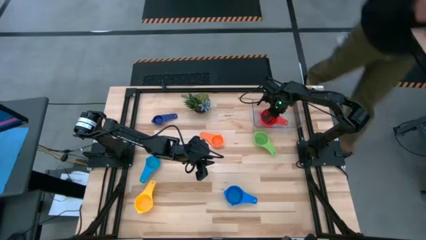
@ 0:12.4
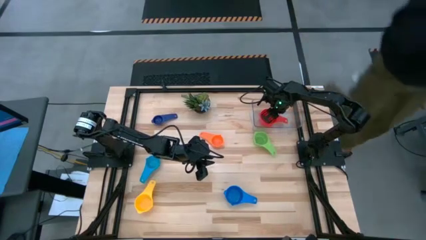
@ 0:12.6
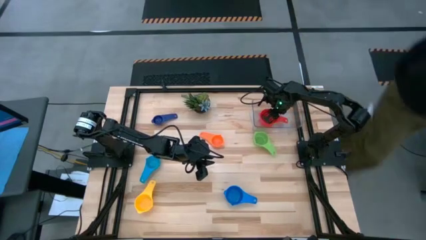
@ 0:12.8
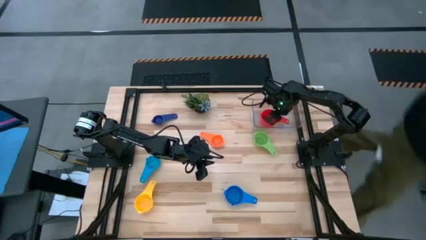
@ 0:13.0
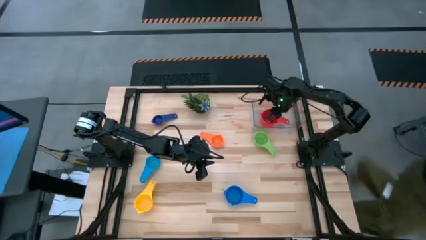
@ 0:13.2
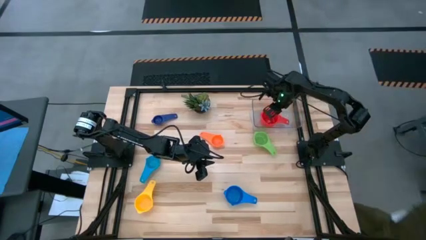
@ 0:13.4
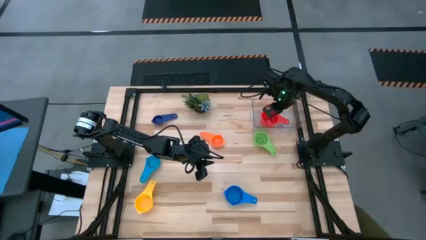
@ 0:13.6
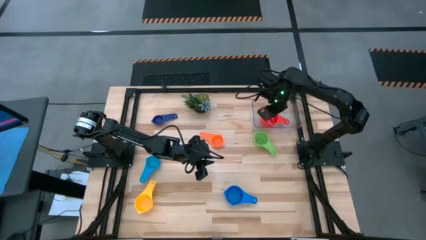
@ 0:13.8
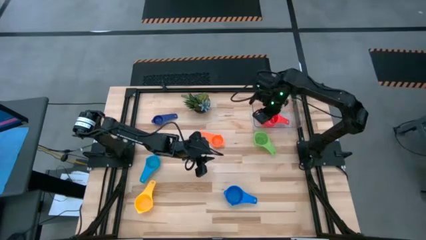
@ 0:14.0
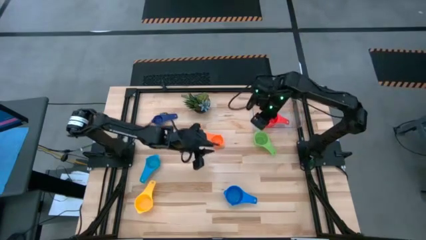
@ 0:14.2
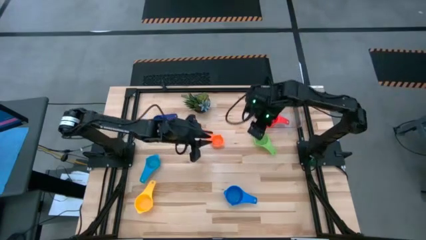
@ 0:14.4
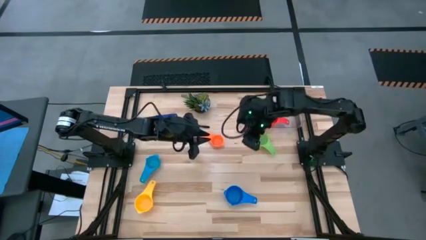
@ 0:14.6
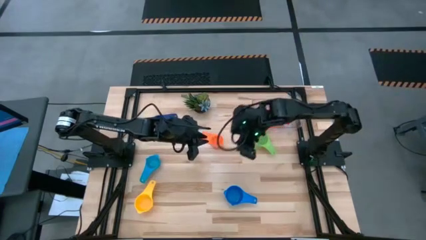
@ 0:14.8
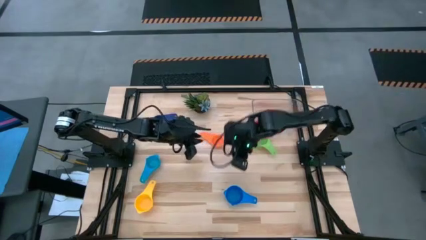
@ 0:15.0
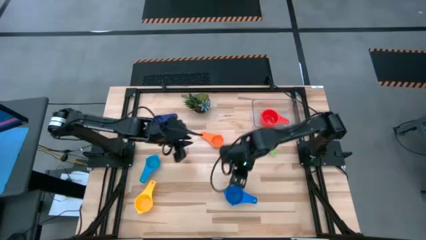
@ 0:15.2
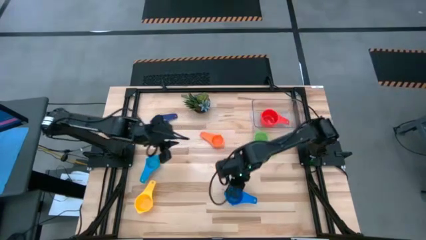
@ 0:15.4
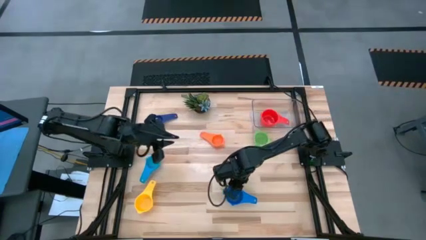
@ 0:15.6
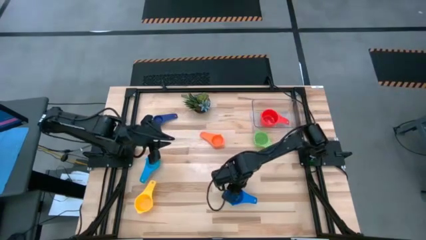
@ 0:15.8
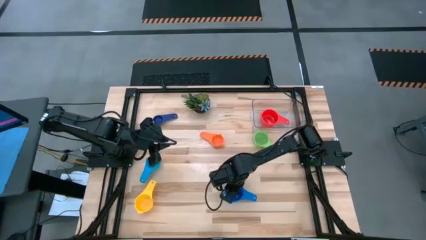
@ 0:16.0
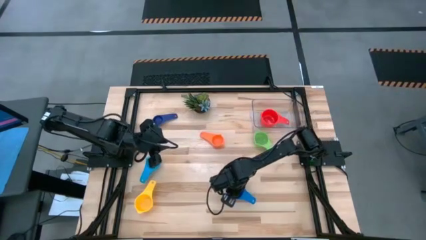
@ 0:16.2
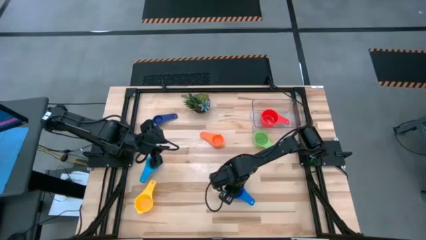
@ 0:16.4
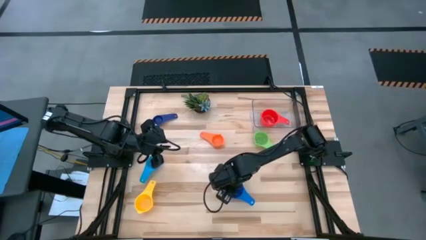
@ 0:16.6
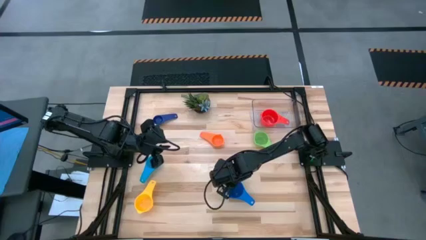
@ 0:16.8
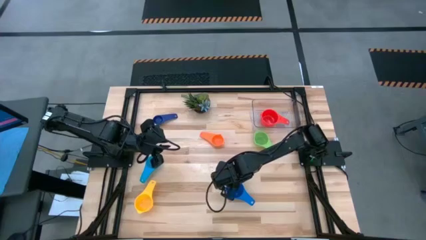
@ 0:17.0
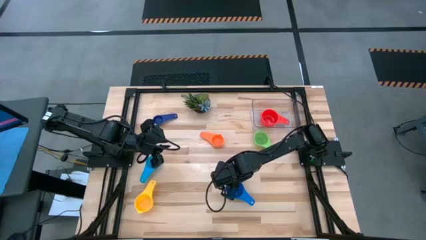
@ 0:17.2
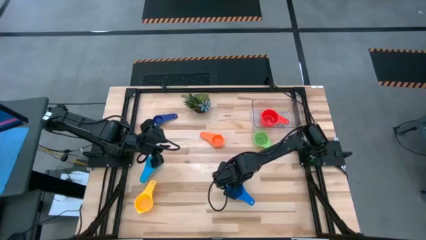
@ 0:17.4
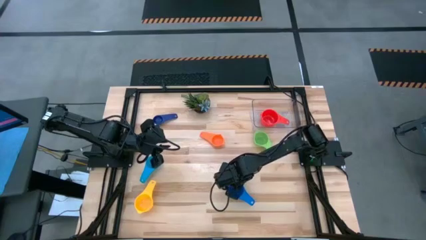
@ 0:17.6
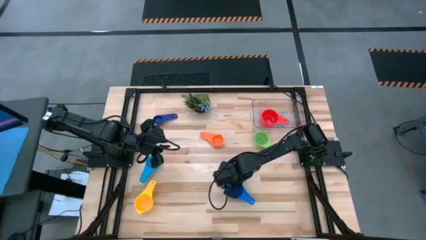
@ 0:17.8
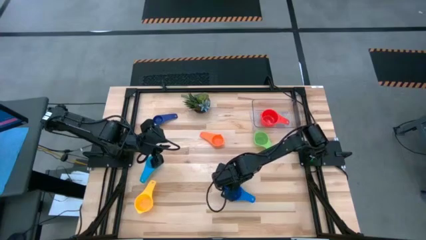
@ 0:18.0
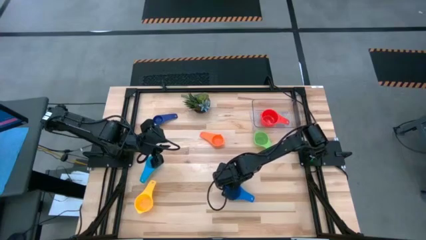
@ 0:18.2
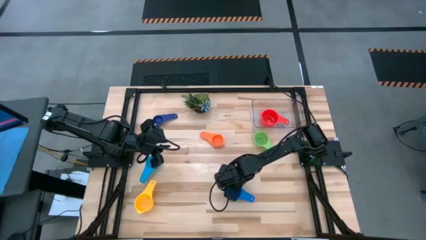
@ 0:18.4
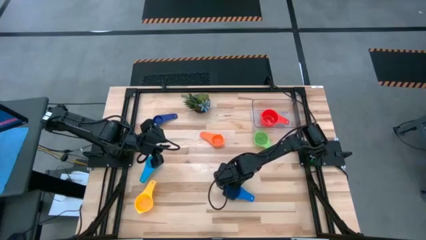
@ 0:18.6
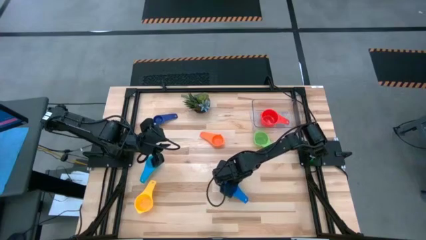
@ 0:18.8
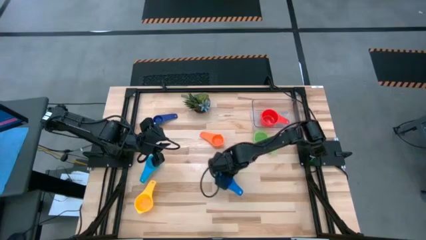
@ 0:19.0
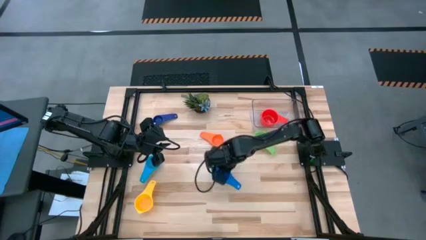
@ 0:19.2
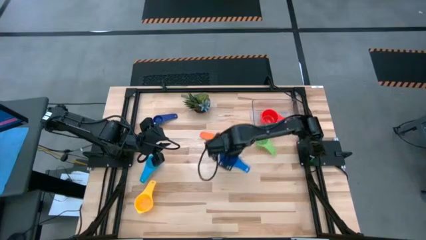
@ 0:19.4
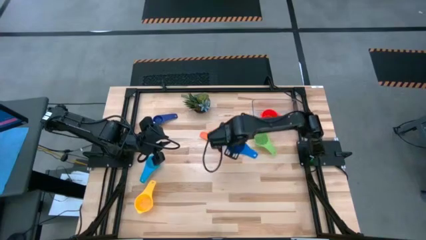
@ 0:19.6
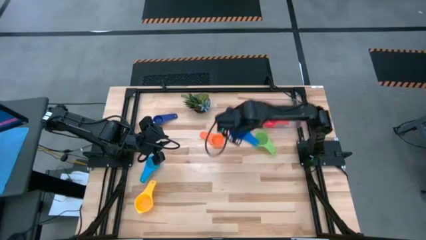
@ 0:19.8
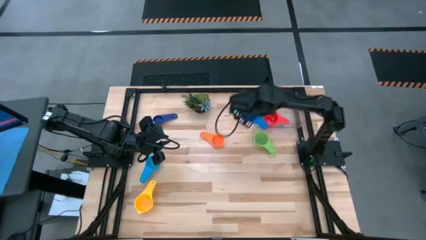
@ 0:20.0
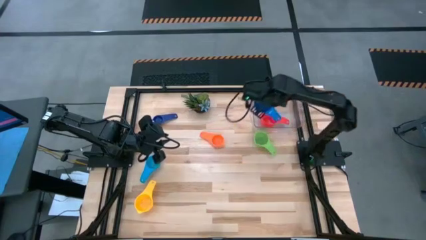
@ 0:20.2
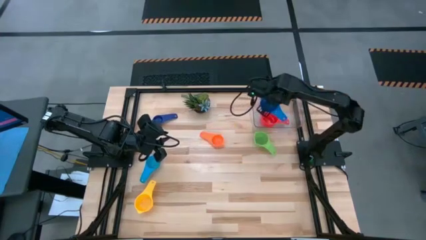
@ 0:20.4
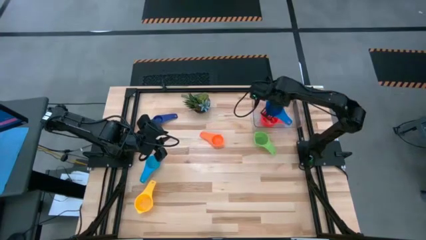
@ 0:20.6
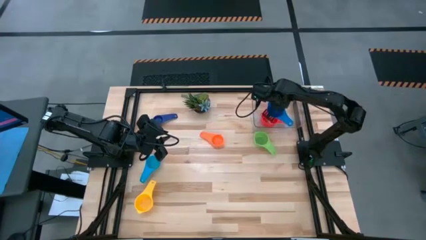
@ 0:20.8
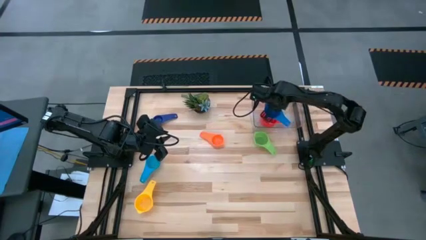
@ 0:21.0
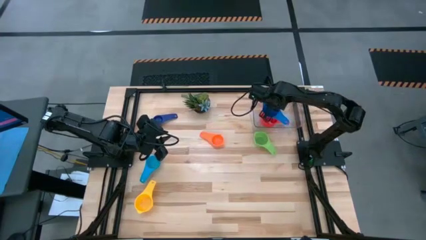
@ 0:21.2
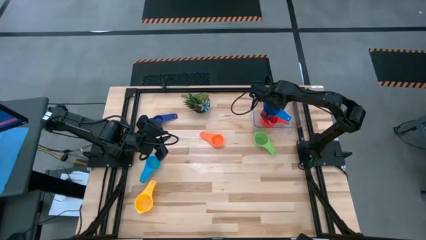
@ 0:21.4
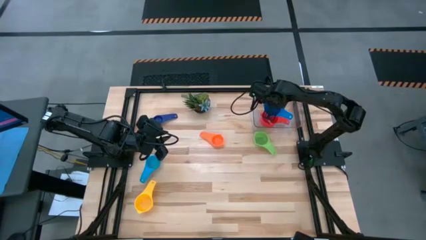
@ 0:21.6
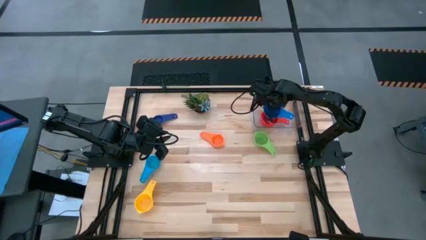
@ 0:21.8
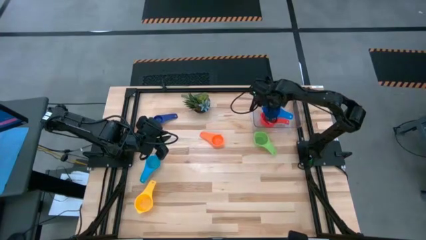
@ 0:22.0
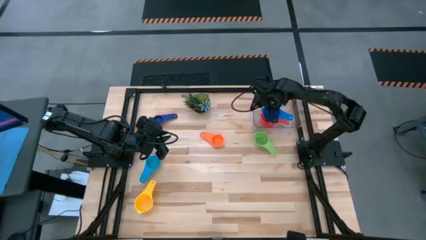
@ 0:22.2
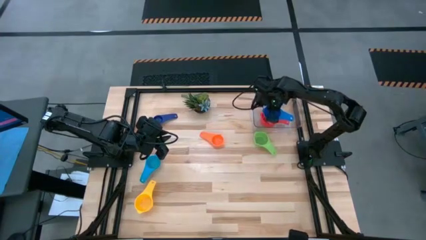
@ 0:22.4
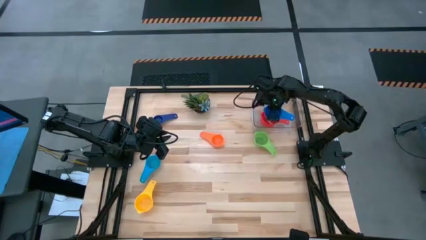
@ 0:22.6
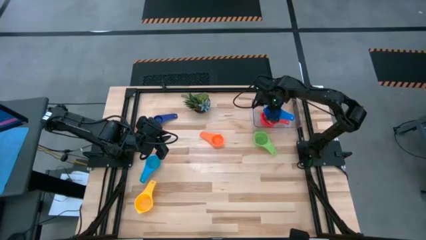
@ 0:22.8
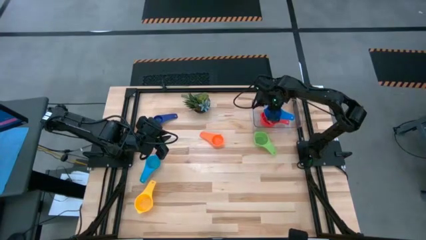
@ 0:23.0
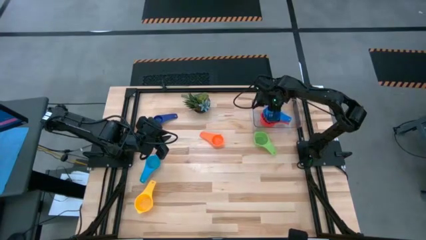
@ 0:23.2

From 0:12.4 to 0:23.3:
Task: Nest measuring cups in basket
Stack the blue measuring cup on top of the red measuring cup in the transparent bin

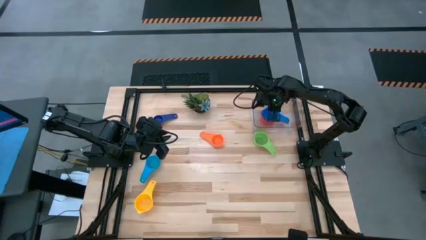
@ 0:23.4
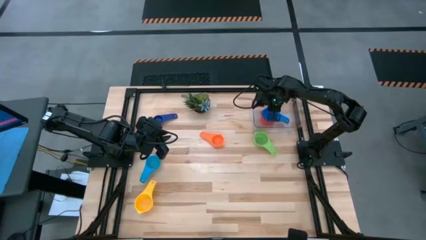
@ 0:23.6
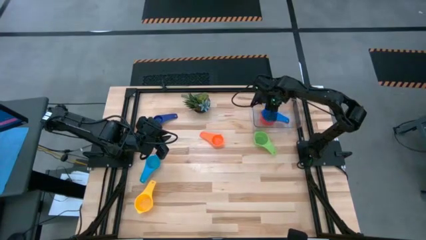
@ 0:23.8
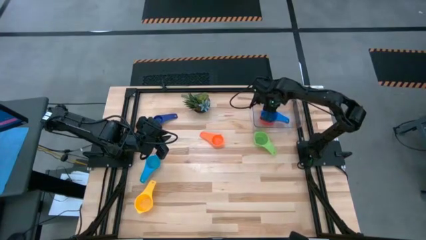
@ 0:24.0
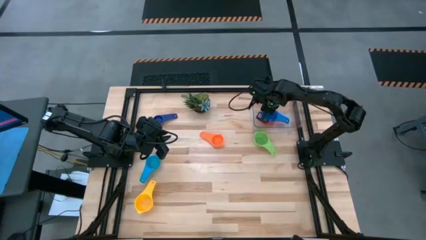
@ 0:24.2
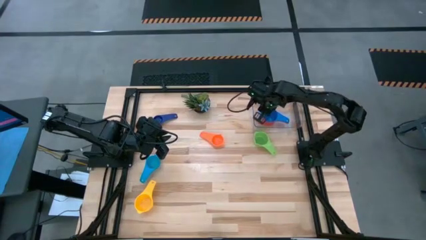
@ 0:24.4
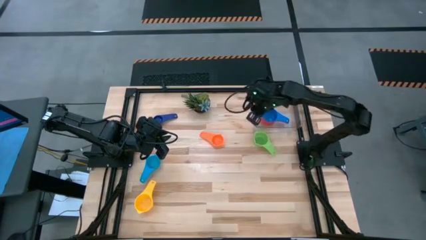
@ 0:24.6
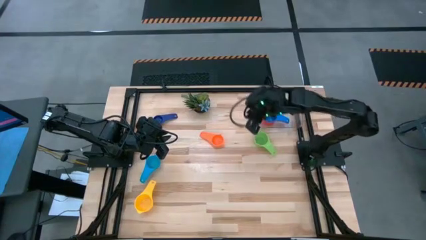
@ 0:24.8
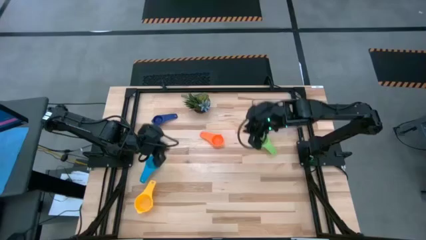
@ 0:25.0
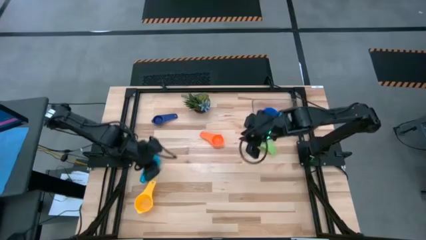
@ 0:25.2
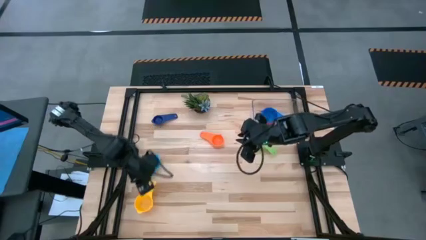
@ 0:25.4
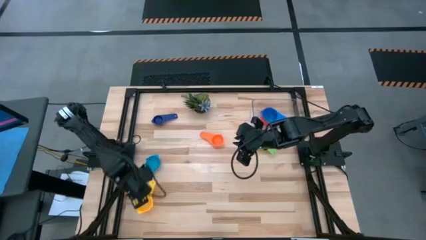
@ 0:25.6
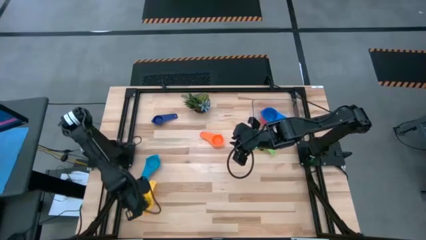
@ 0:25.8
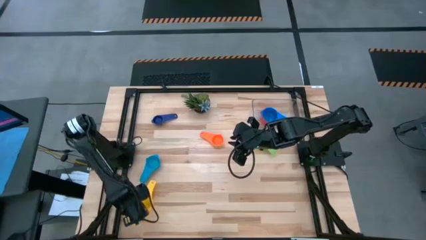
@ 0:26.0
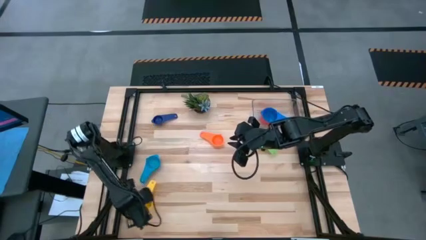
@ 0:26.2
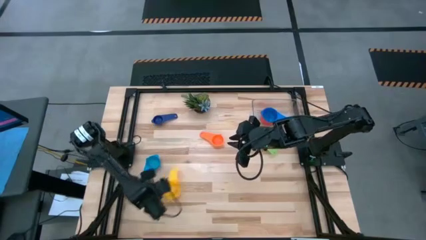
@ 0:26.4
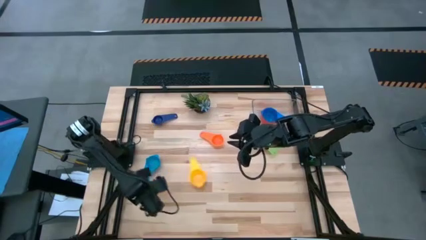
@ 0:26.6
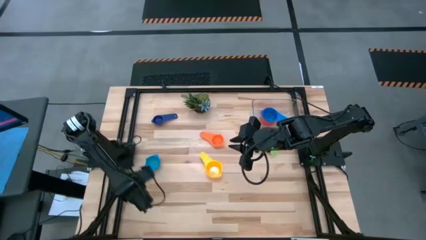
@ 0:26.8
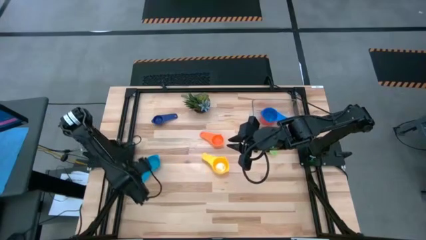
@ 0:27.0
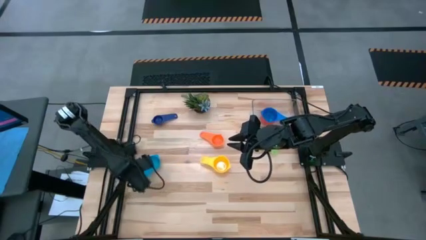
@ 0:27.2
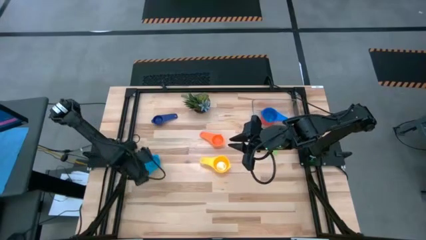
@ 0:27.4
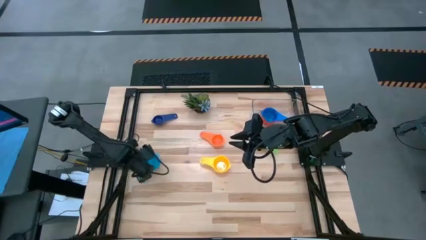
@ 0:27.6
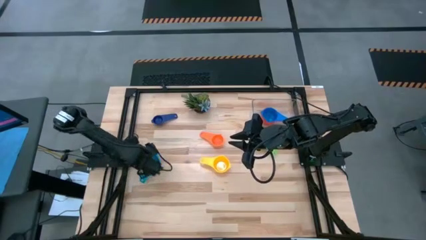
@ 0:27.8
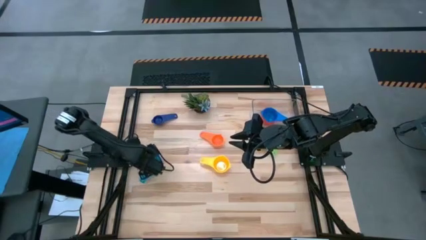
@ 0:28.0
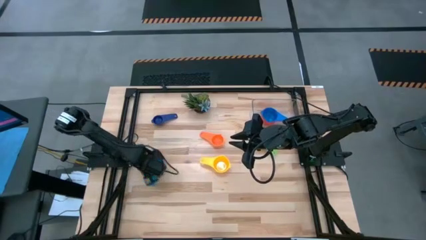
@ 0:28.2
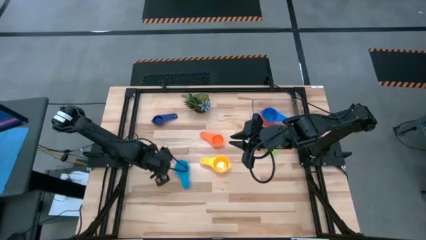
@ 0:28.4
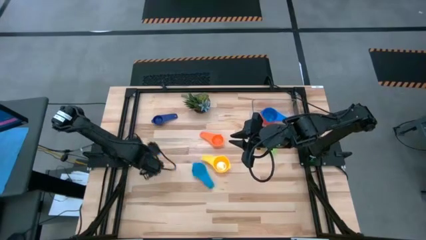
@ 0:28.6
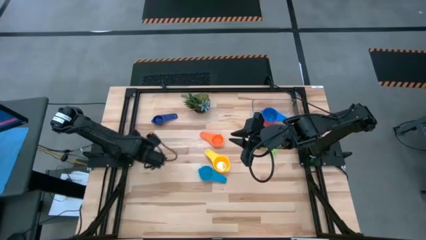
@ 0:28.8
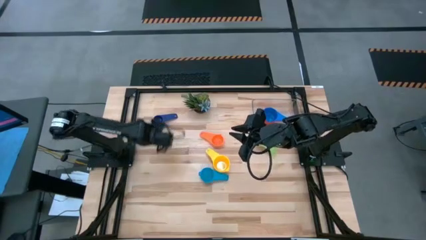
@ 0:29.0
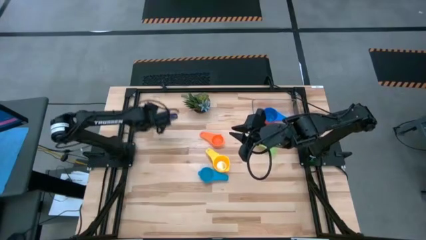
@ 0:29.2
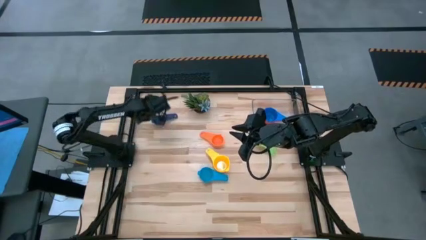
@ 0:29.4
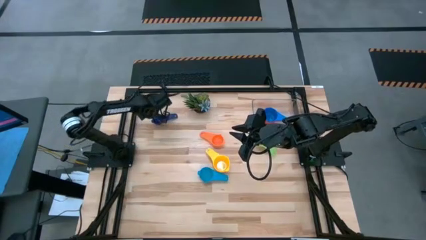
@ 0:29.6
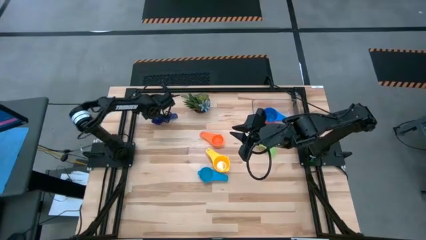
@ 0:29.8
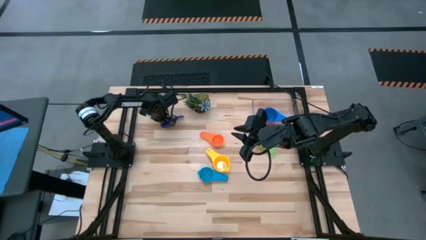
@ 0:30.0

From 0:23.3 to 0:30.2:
Move the measuring cups to the center of the table
